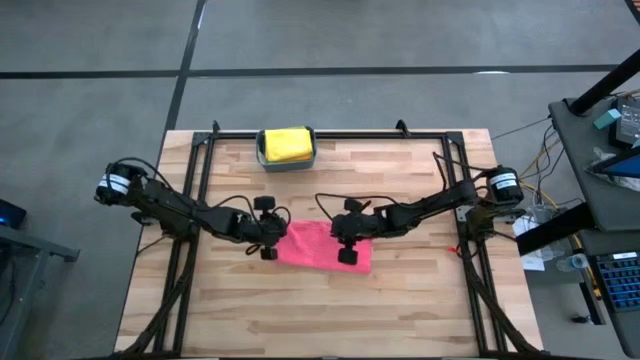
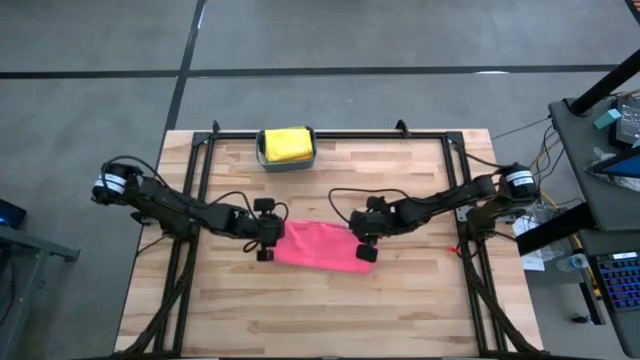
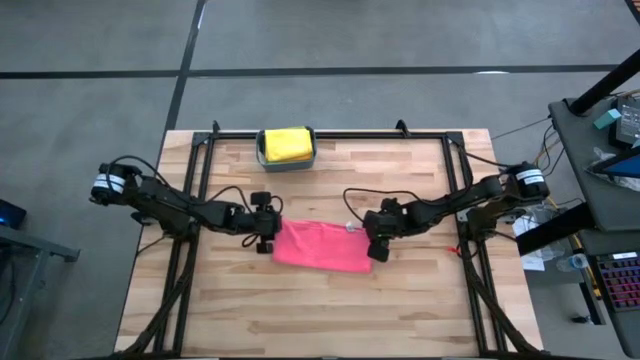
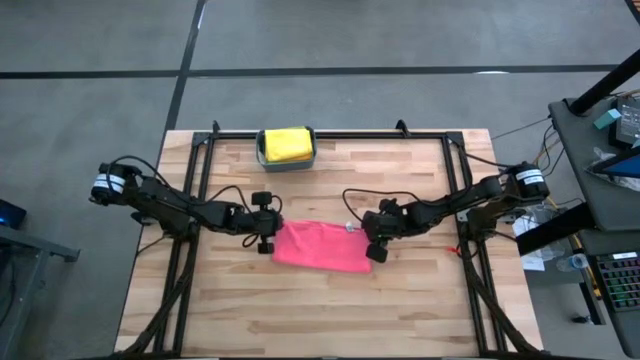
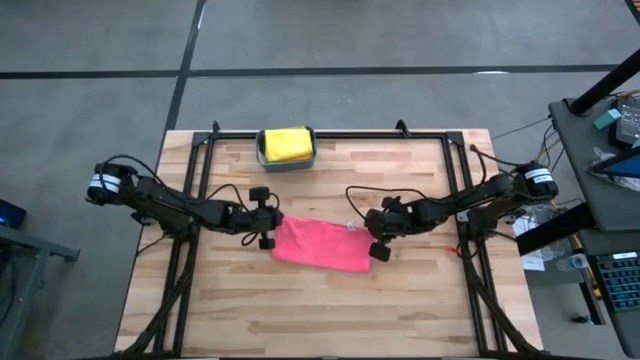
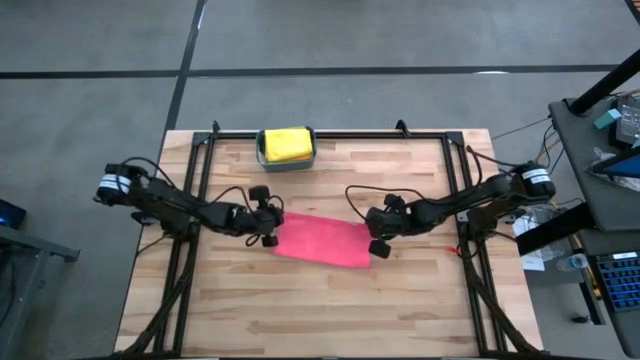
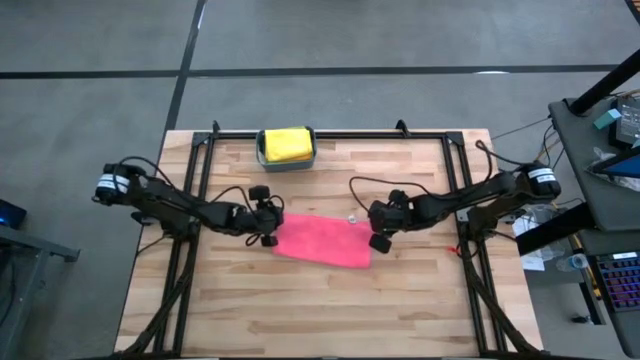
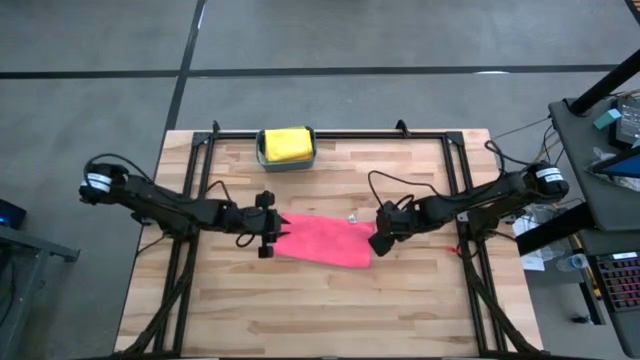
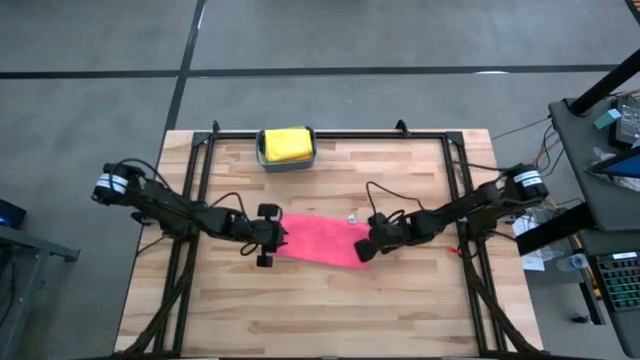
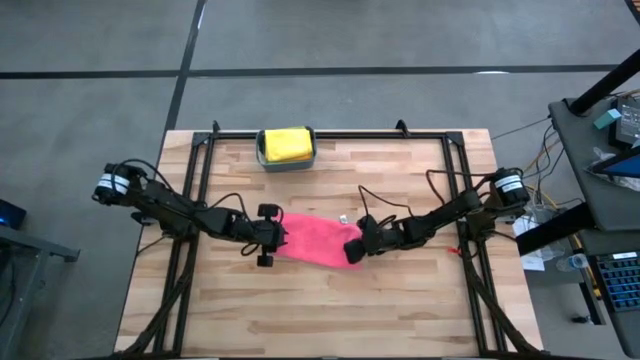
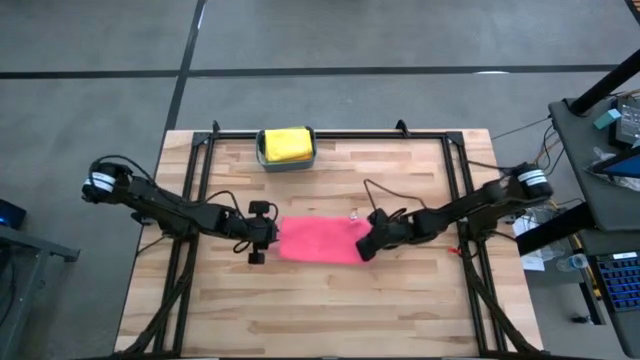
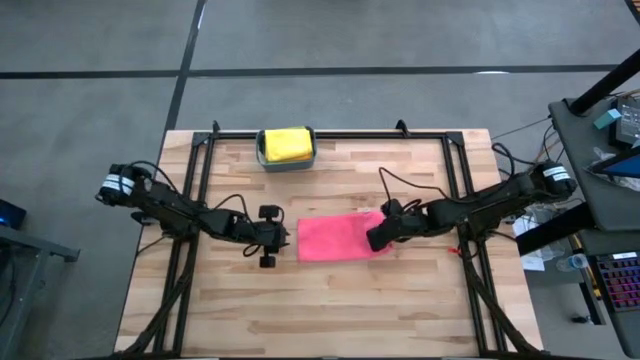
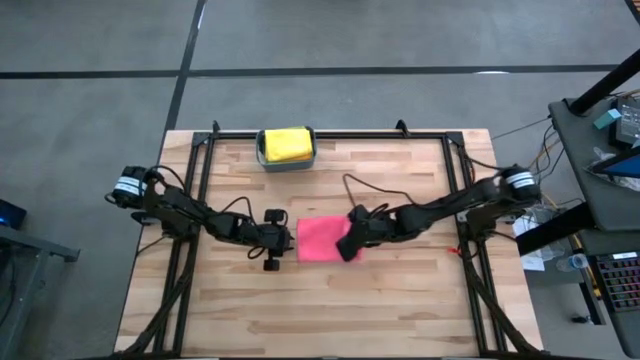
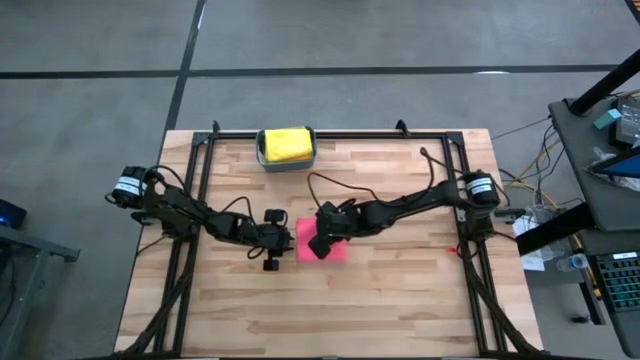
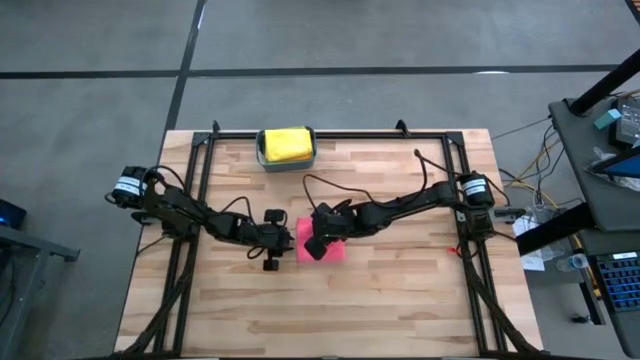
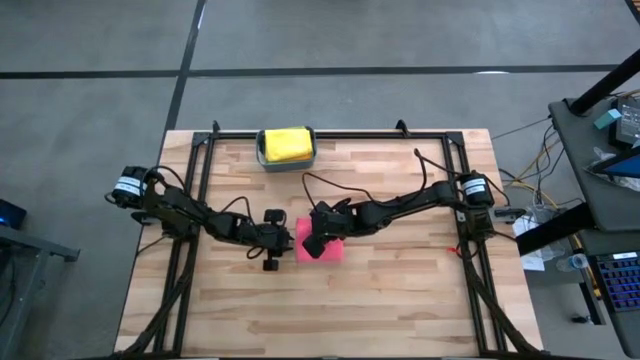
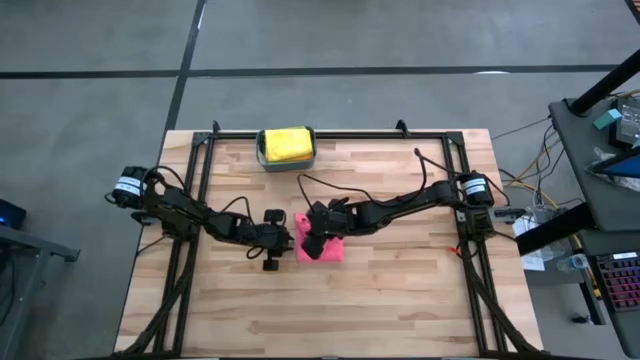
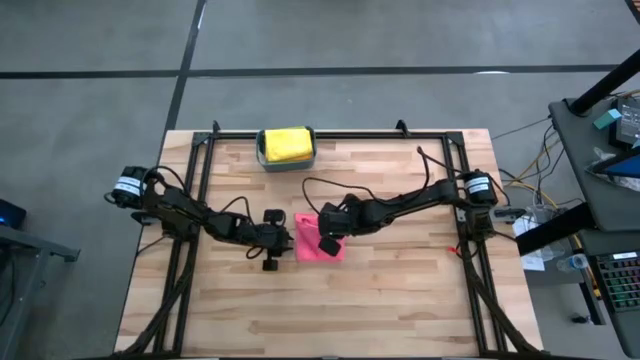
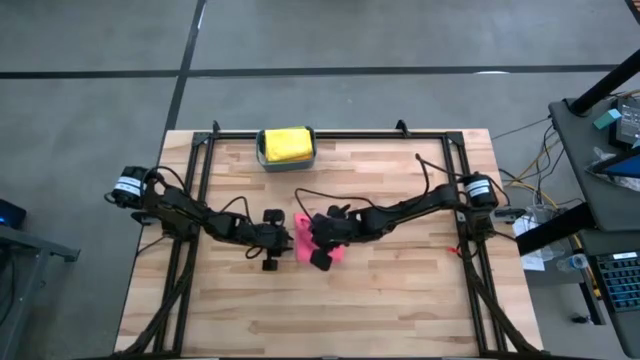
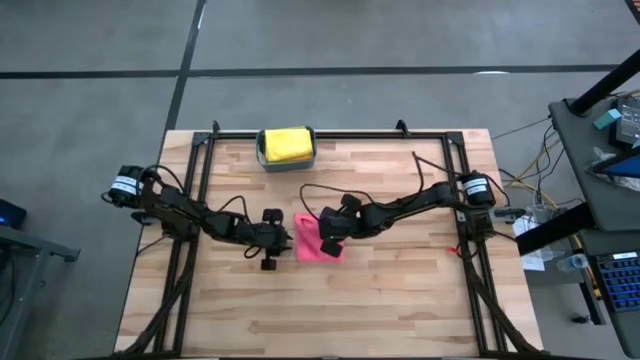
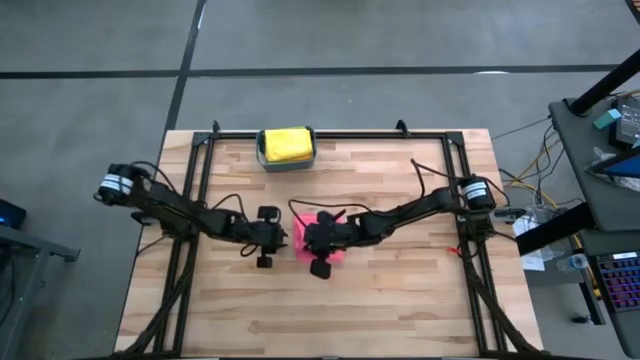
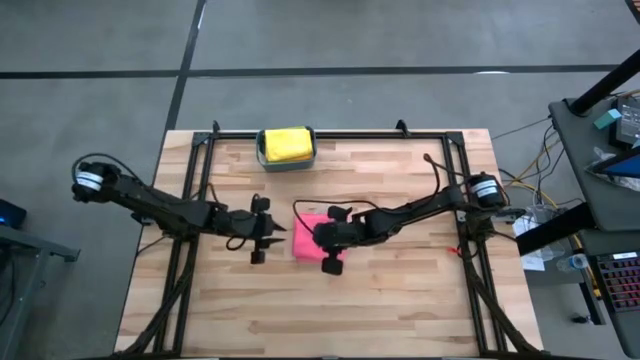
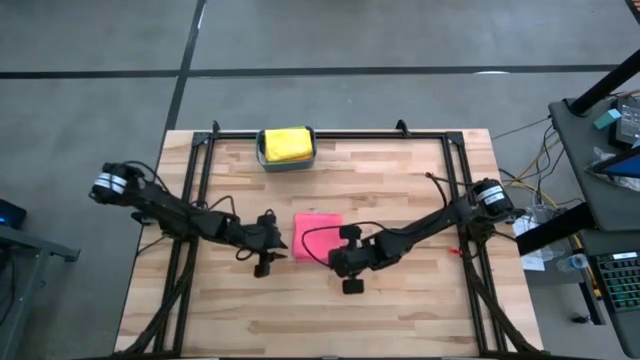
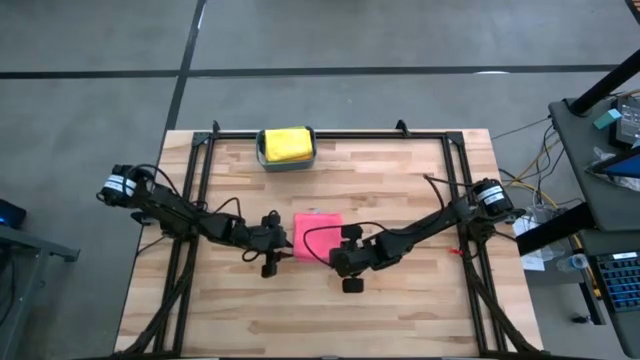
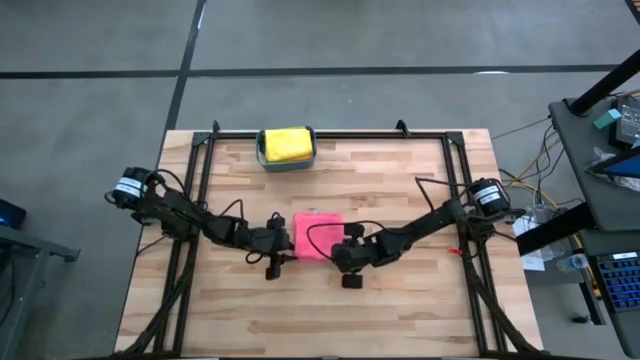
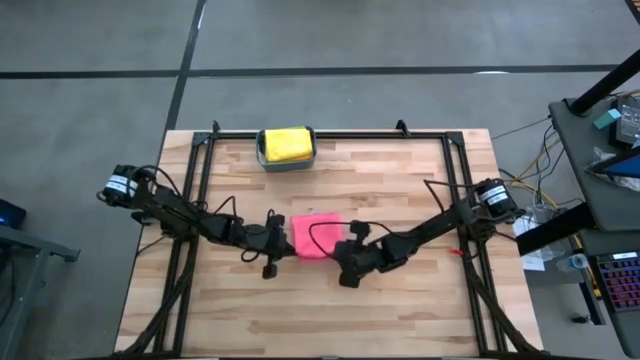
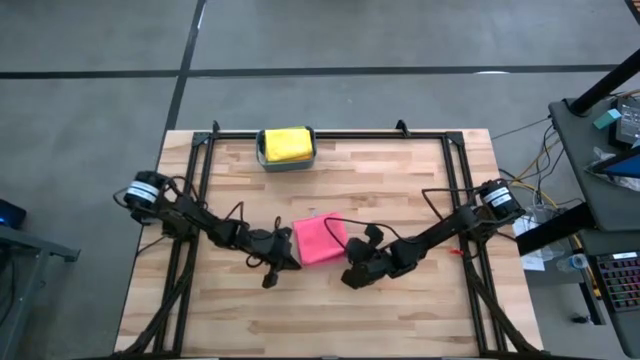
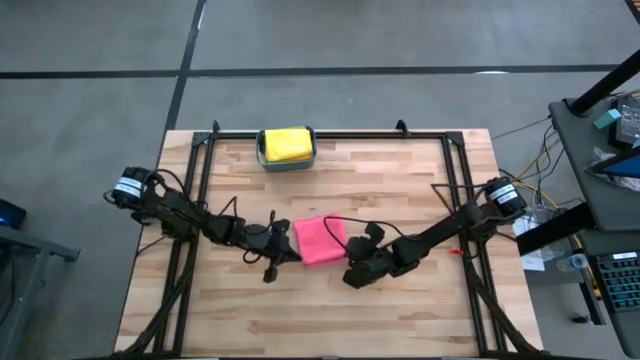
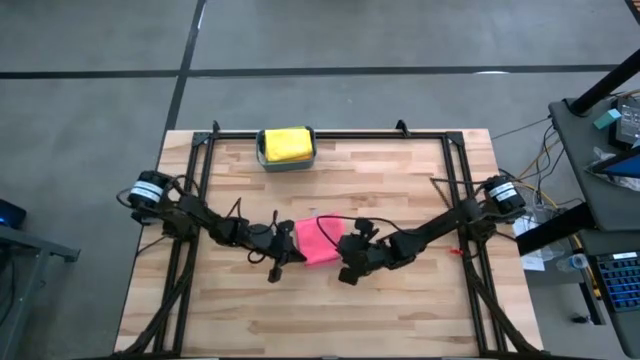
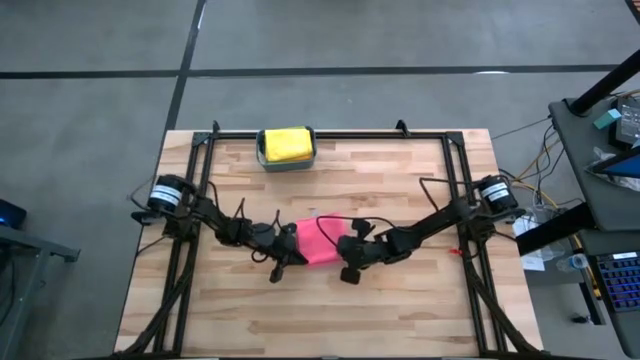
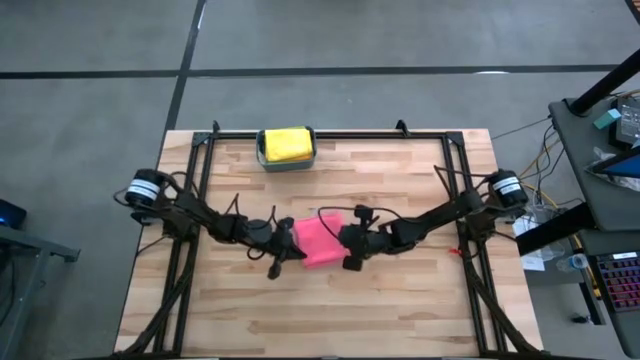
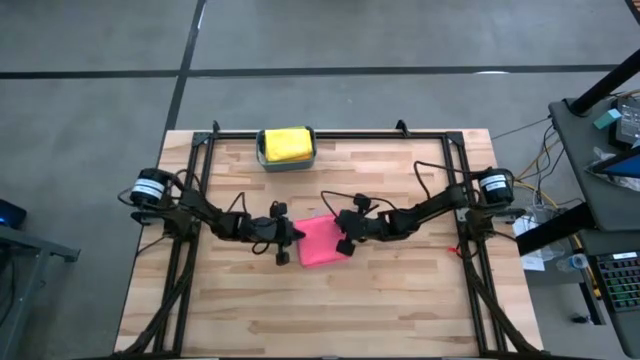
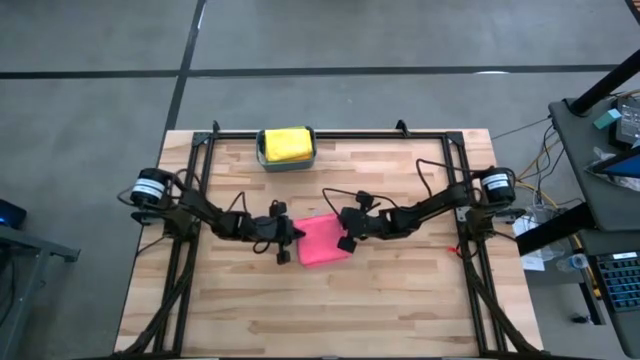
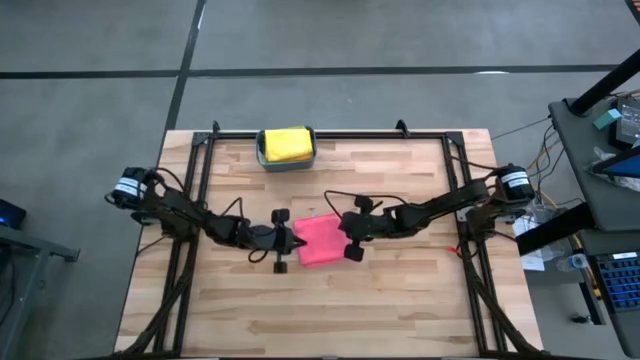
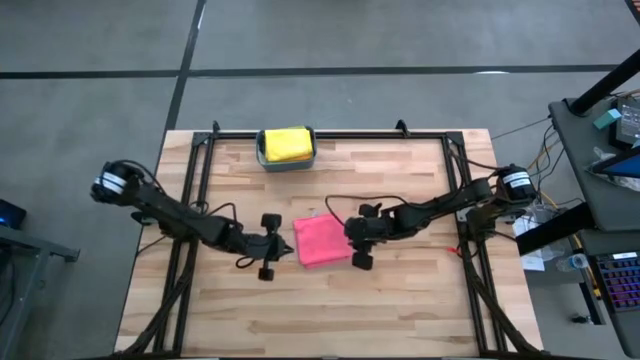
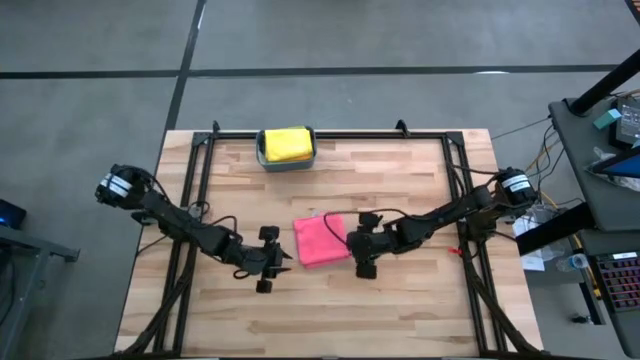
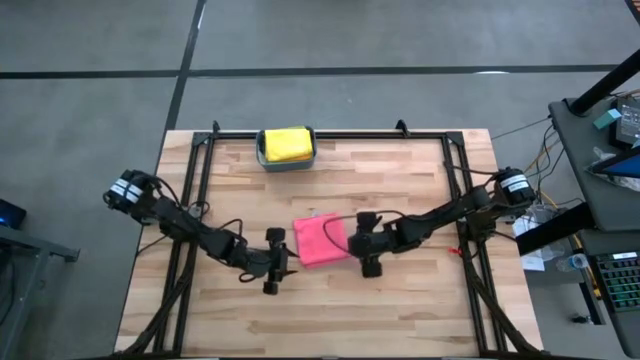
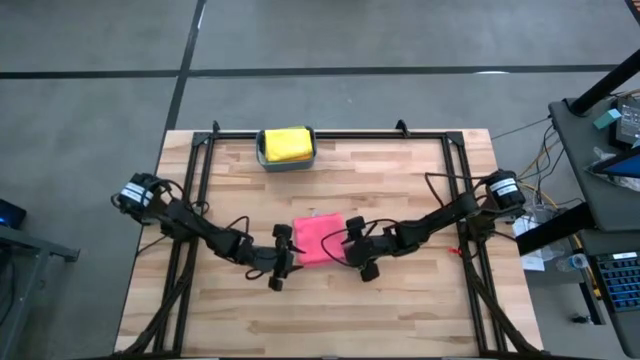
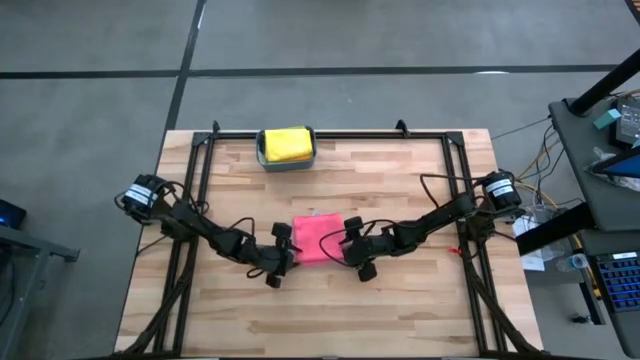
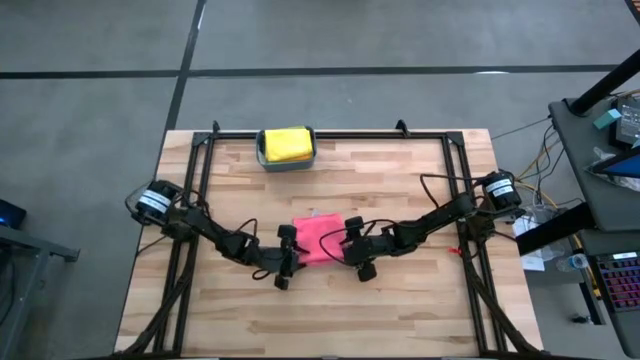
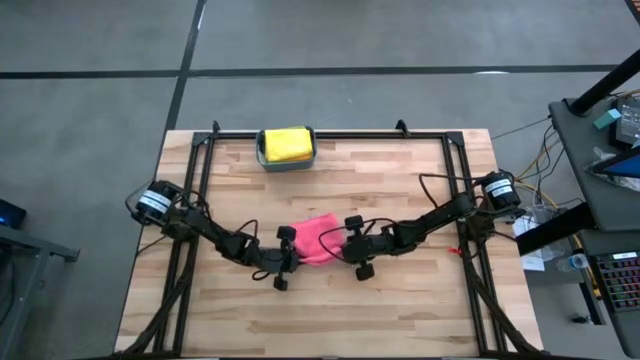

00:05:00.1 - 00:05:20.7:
Task: Fold microfiber towels
Fold the pink towel

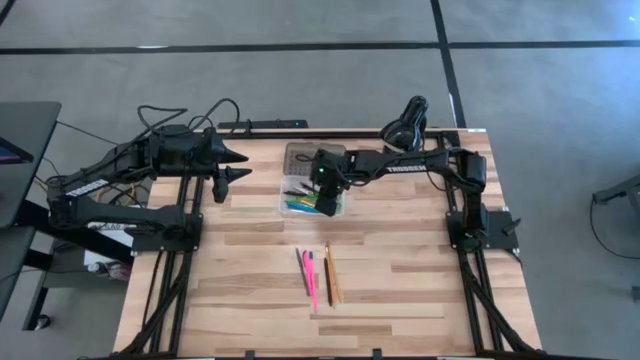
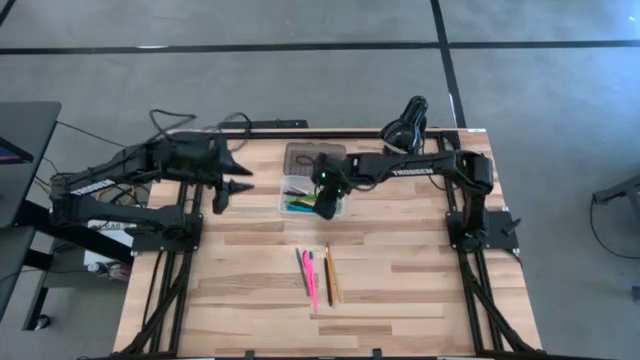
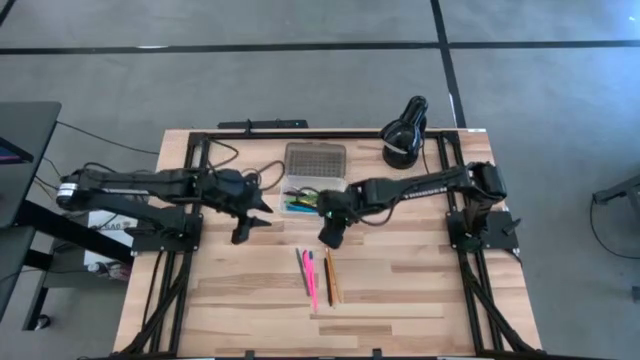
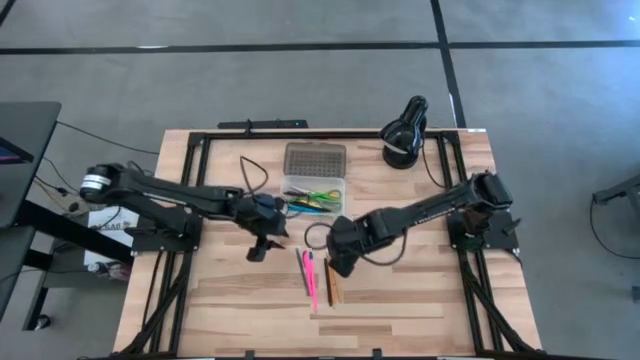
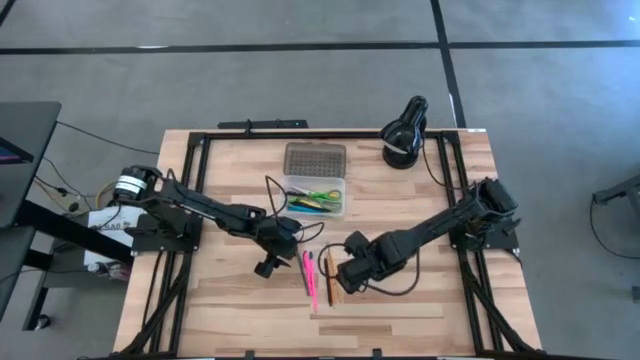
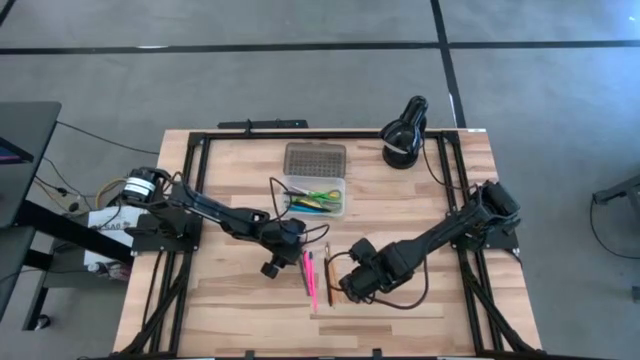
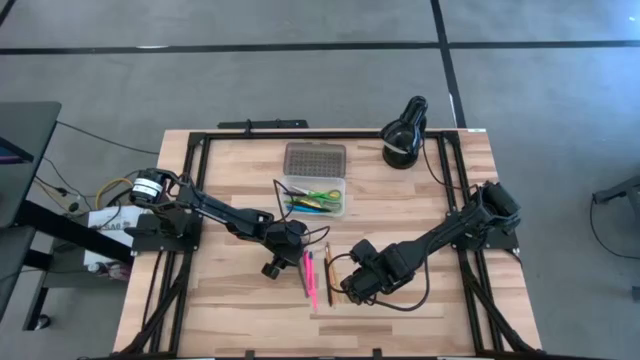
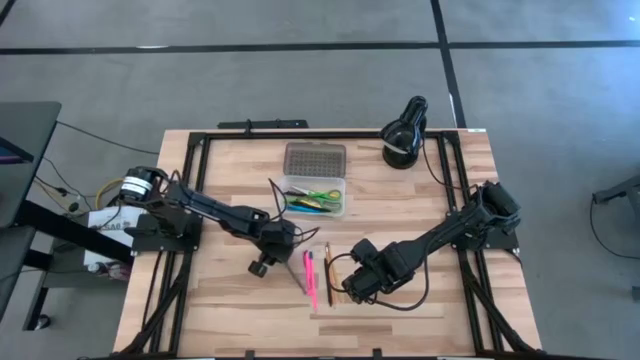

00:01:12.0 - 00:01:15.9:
Task: Pick & place school supplies into a supply box
Put the gray pen into the supply box
